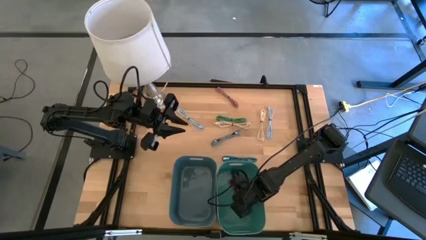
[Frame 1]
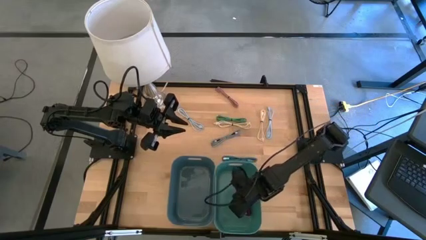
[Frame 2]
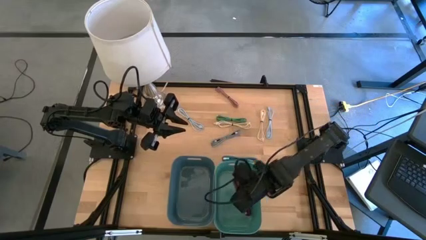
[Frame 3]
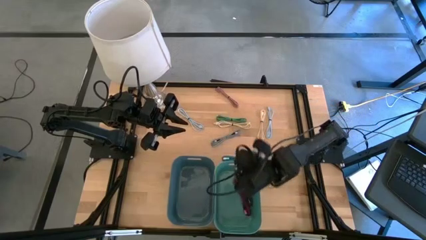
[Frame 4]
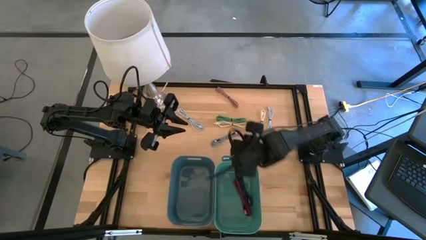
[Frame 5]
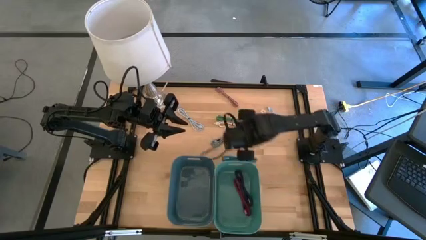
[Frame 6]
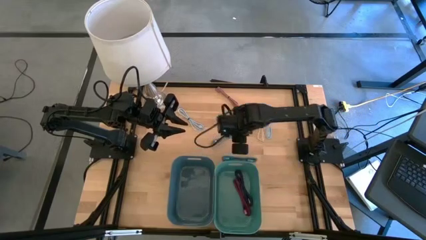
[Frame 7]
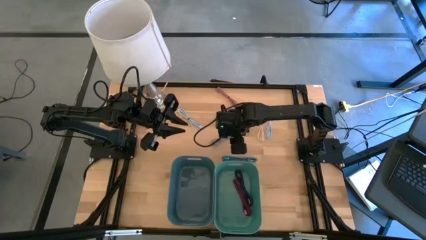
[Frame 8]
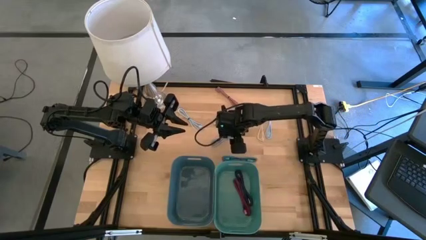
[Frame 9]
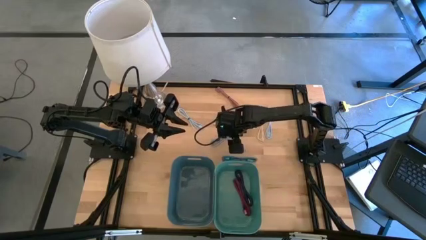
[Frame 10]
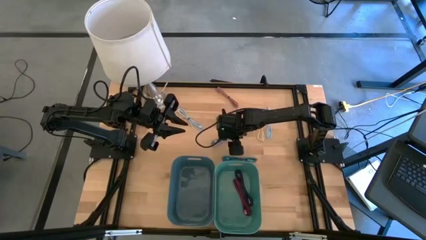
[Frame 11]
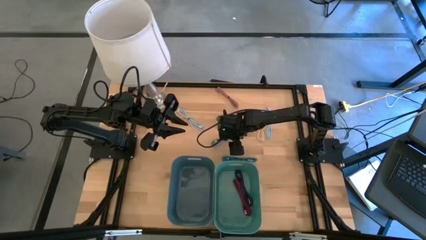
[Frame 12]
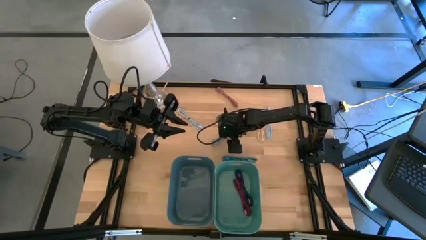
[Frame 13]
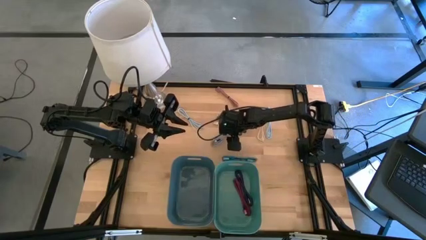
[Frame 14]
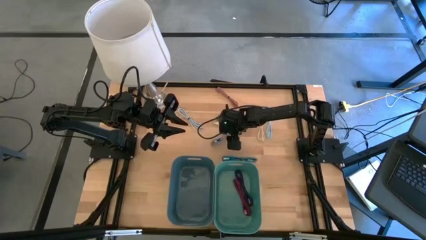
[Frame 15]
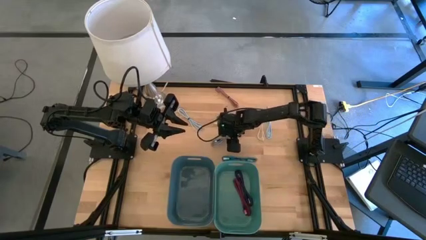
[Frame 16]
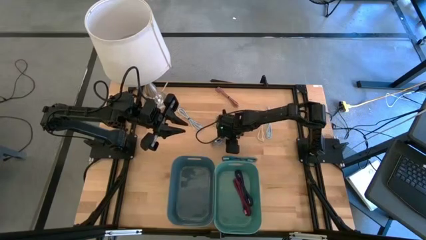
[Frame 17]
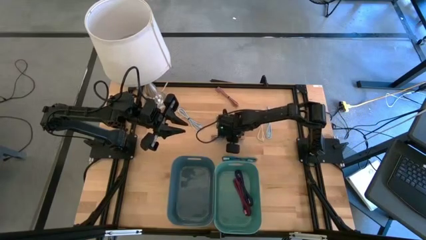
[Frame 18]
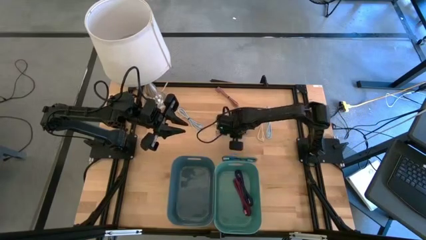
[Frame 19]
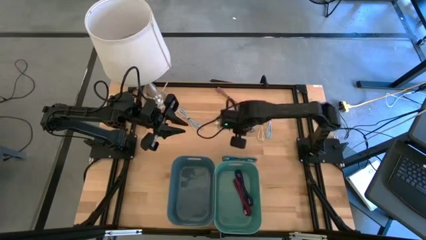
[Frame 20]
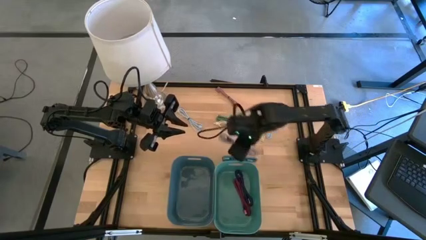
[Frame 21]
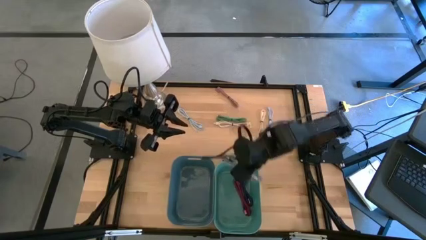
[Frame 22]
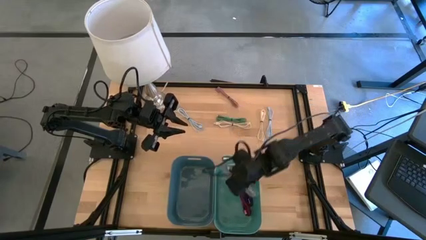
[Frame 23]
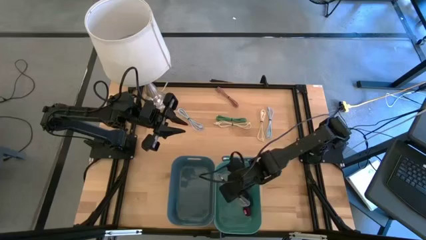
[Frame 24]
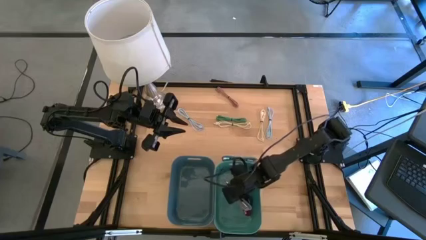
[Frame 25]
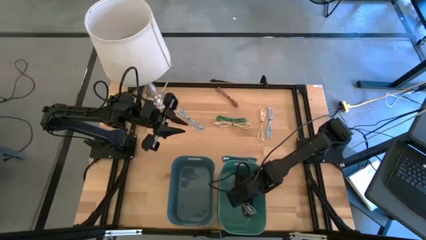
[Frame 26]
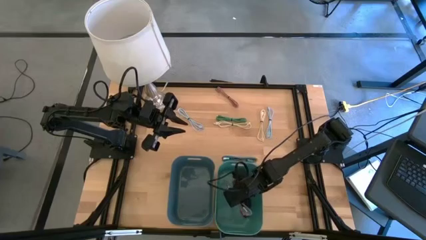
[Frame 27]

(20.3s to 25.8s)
Put the black and white charger cable into the green container

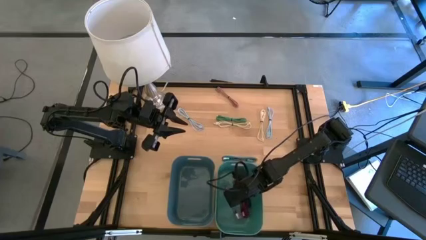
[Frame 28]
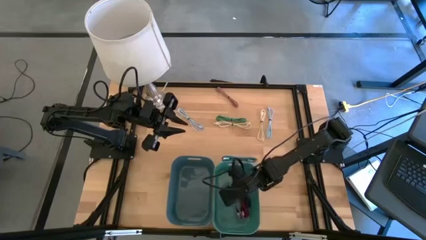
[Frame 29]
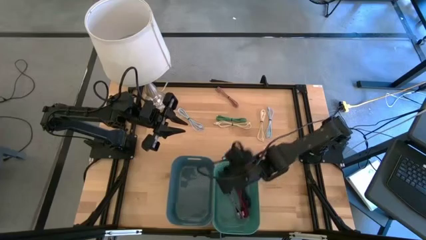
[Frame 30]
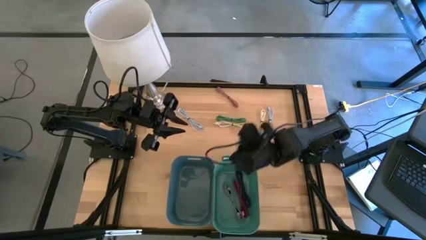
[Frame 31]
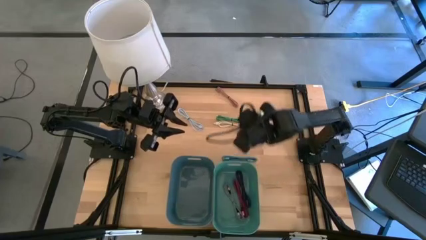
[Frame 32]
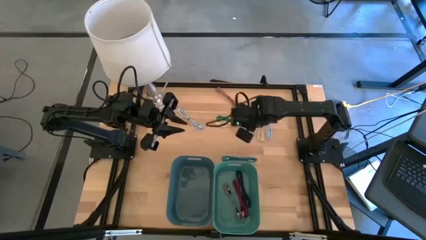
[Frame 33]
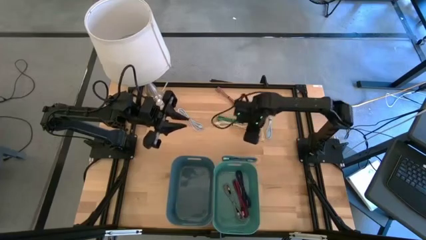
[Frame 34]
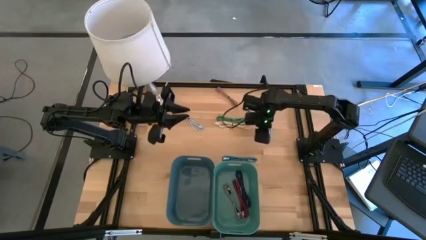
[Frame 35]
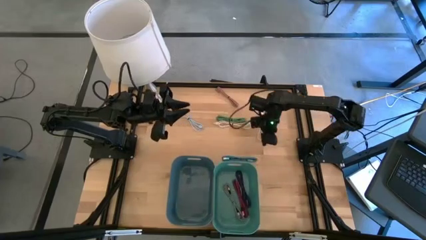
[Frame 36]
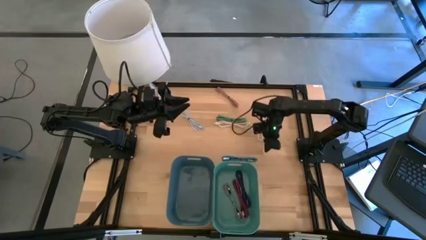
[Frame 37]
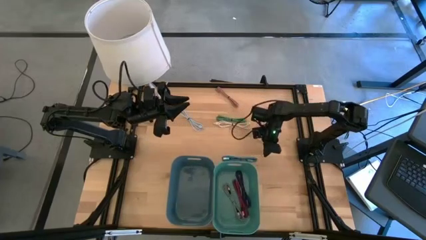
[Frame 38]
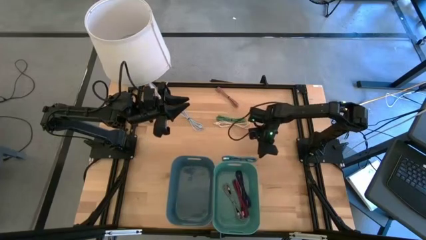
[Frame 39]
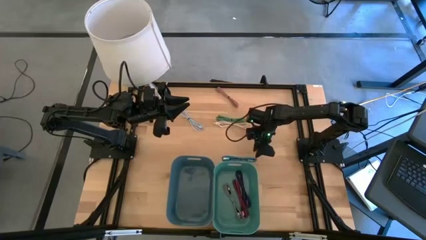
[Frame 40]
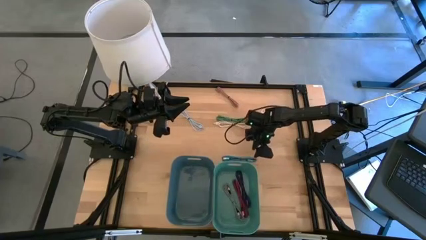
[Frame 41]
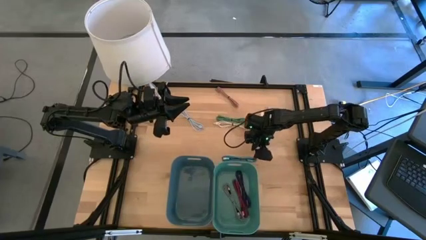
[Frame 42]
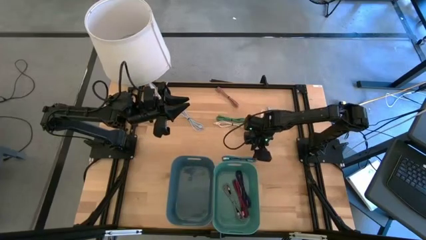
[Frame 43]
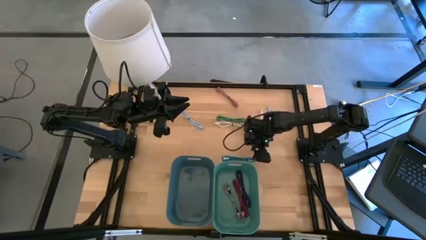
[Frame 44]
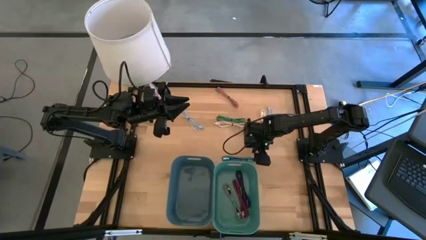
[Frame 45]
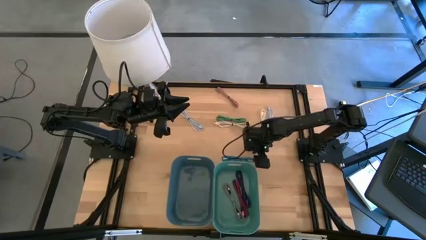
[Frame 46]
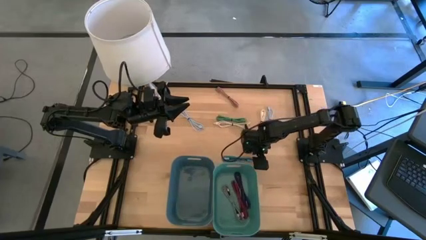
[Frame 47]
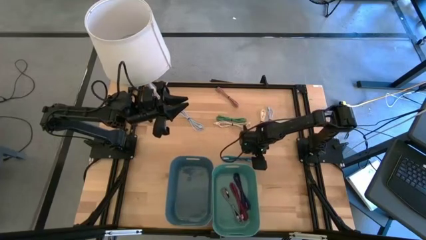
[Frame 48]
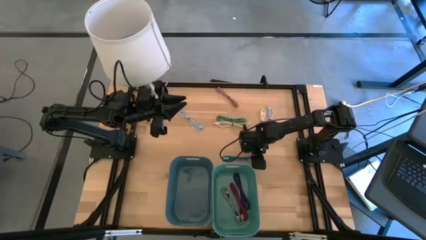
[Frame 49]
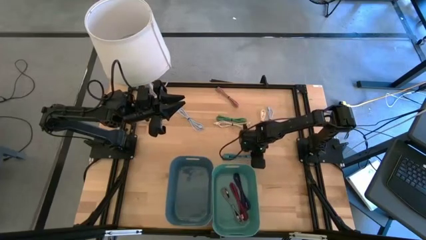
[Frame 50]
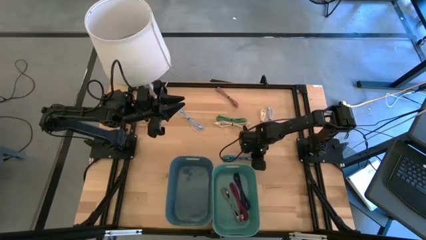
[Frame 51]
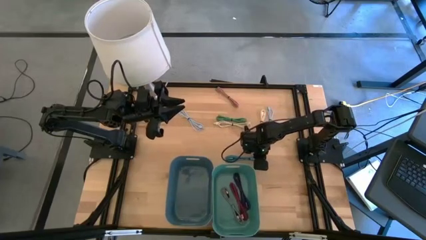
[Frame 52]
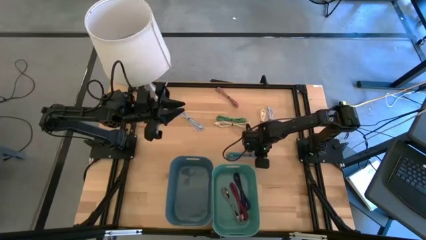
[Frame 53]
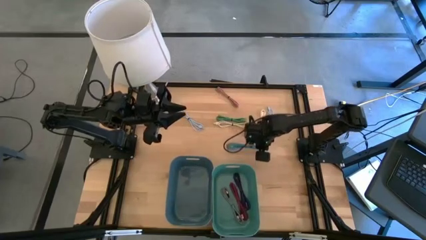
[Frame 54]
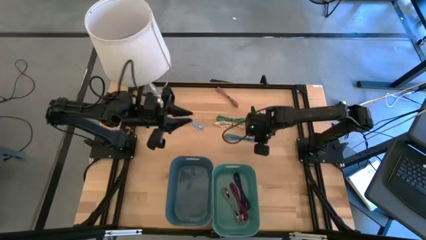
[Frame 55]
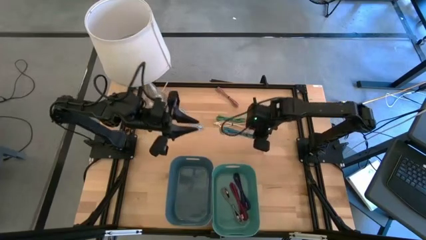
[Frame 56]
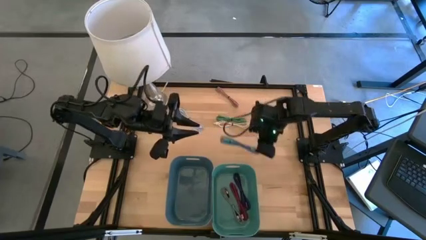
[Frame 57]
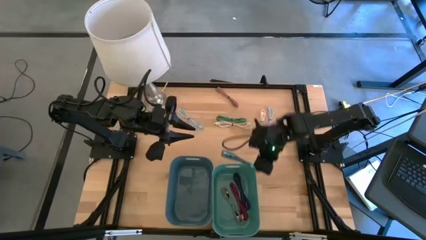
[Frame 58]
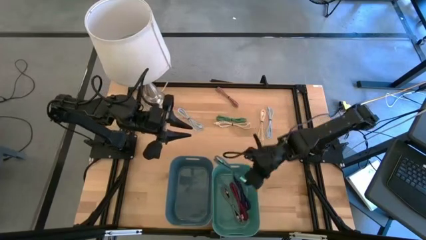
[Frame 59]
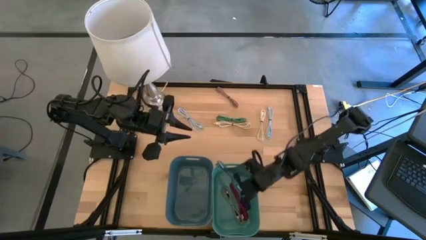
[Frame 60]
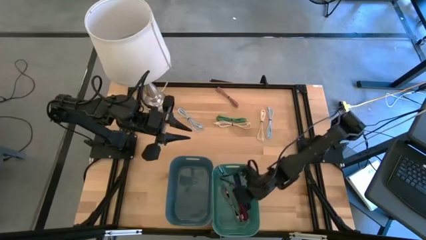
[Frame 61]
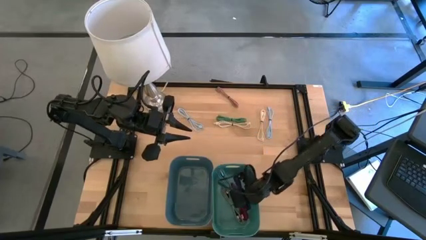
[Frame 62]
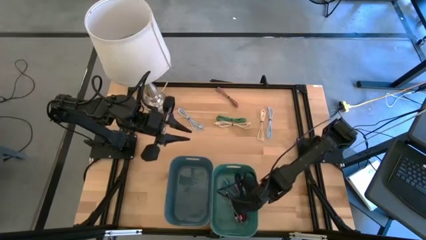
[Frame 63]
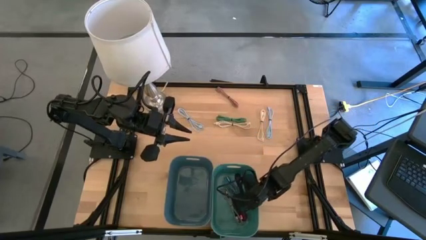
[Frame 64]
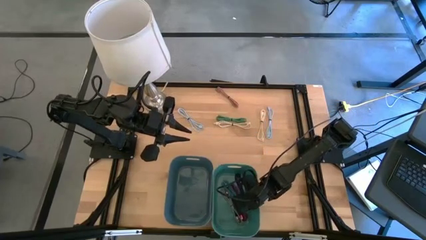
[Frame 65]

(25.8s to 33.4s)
Put the black and blue charger cable into the green container

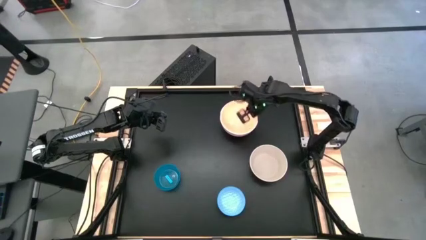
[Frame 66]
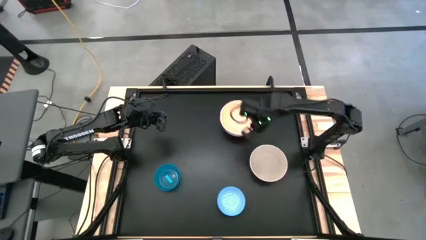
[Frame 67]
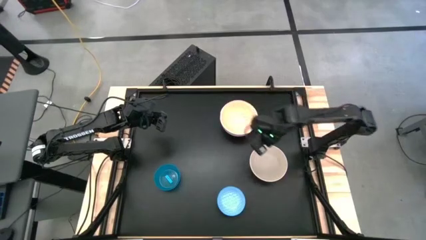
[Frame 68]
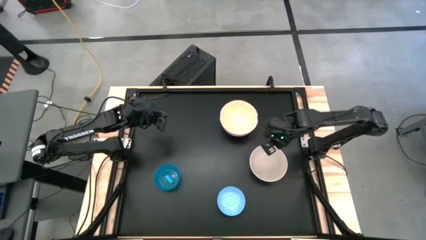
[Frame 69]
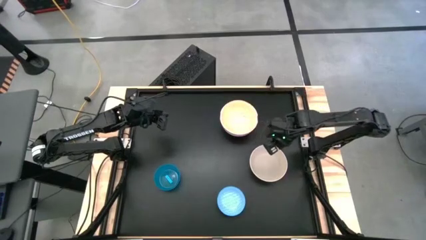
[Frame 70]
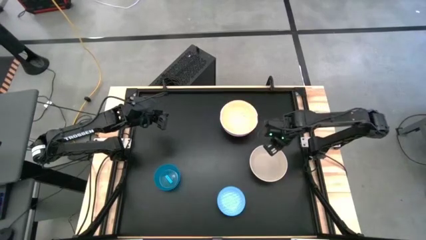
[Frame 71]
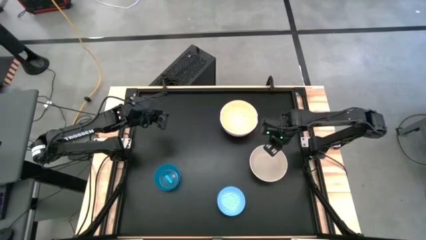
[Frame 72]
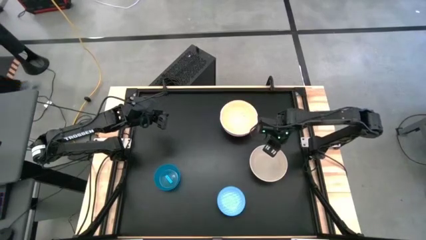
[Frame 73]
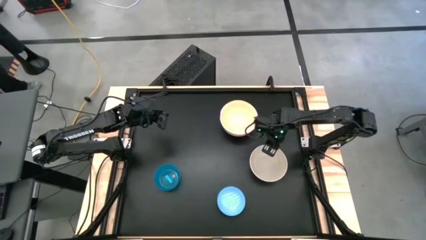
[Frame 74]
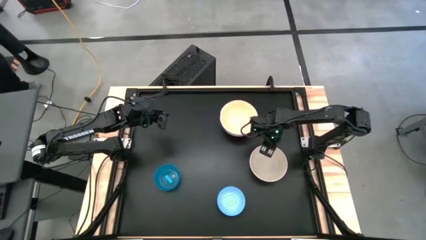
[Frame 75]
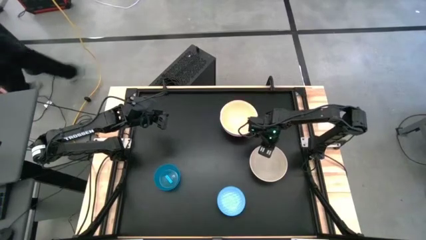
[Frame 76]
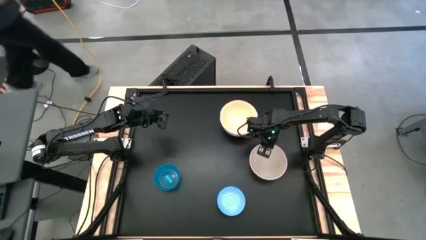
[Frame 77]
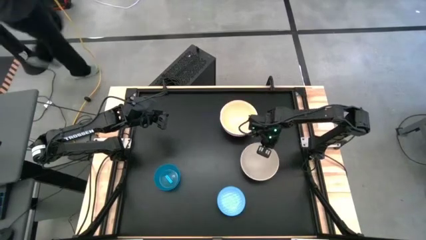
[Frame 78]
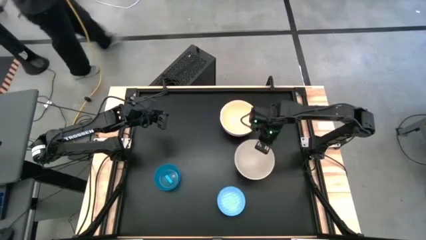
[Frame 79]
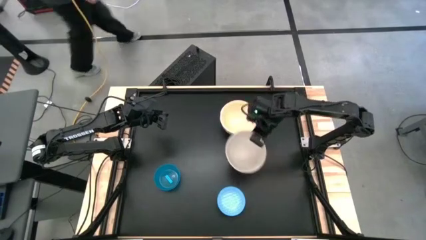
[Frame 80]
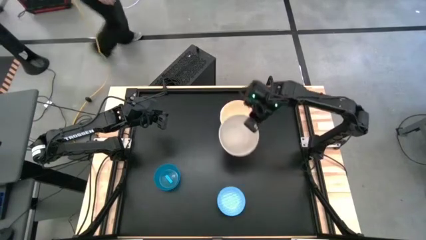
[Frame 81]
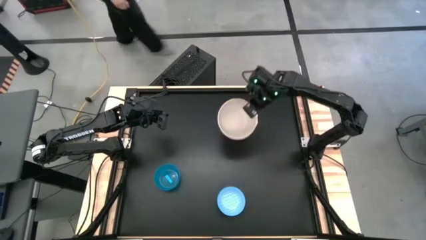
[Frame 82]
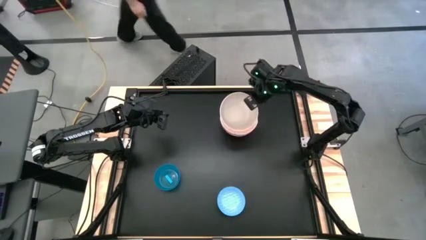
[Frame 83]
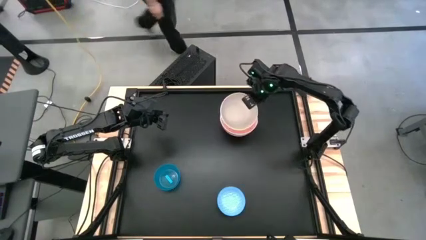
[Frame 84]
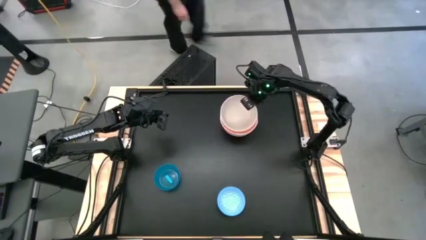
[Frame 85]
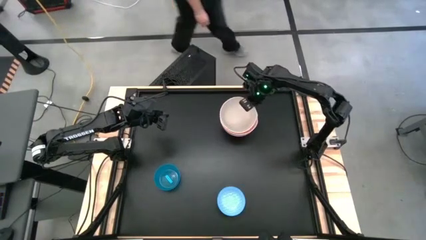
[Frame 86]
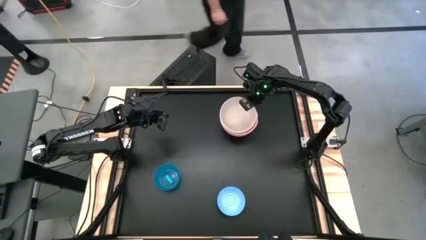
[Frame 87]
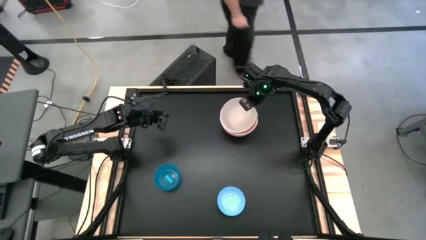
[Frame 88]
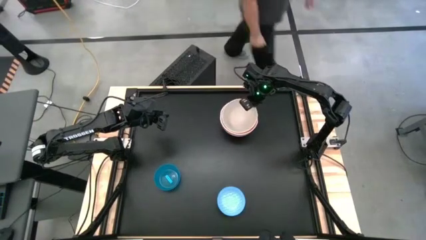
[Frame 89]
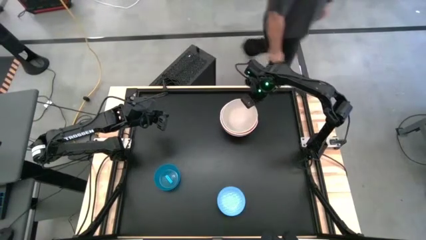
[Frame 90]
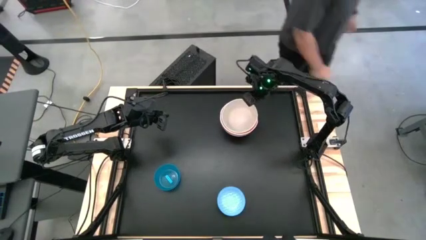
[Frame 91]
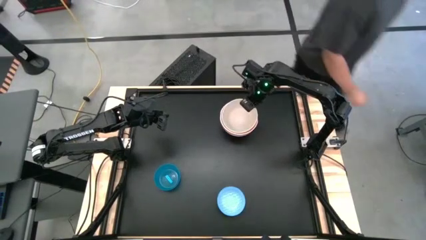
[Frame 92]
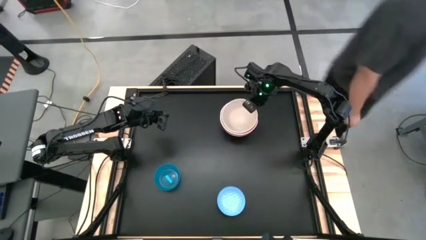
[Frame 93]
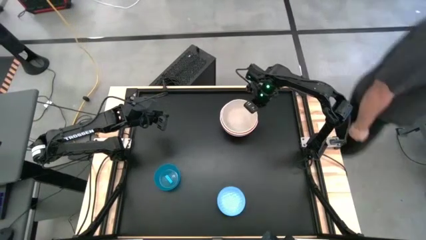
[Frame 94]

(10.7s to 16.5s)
Stack the gray bowl on the light orange bowl
